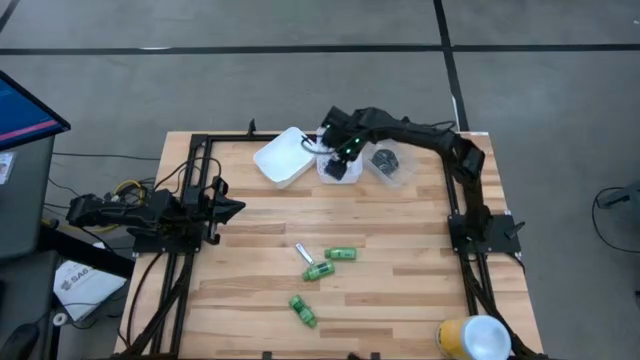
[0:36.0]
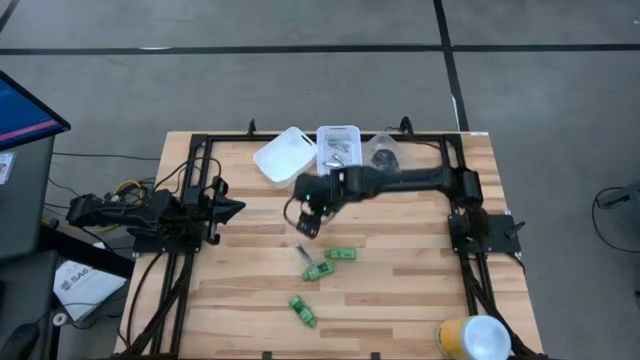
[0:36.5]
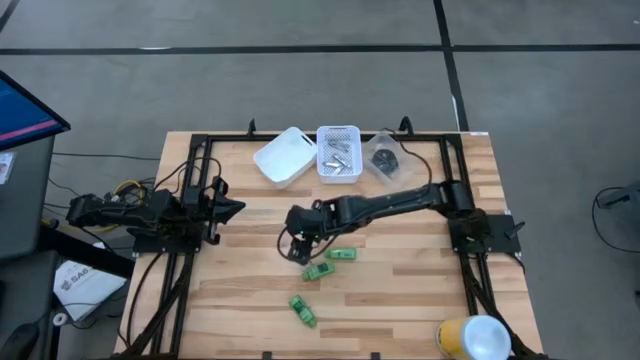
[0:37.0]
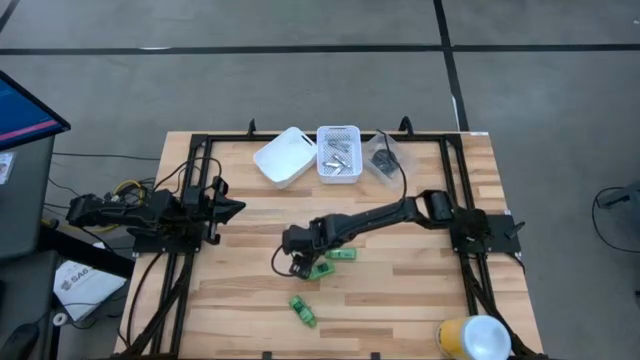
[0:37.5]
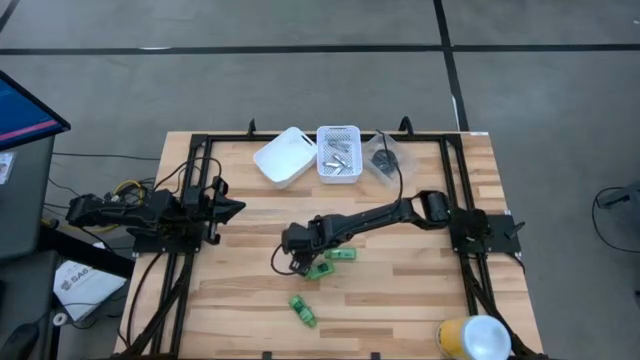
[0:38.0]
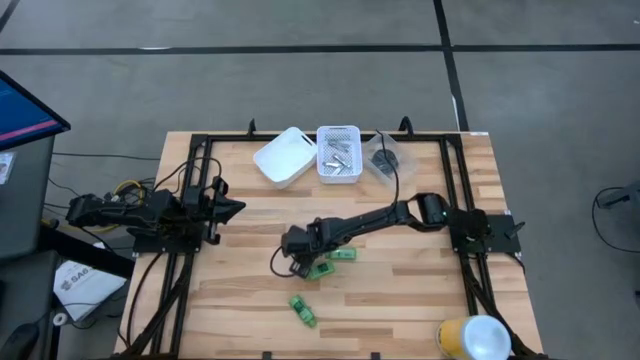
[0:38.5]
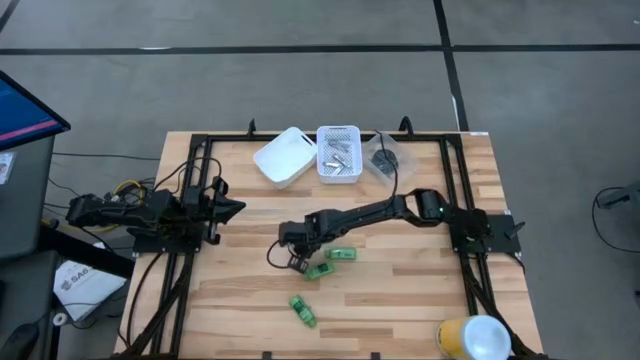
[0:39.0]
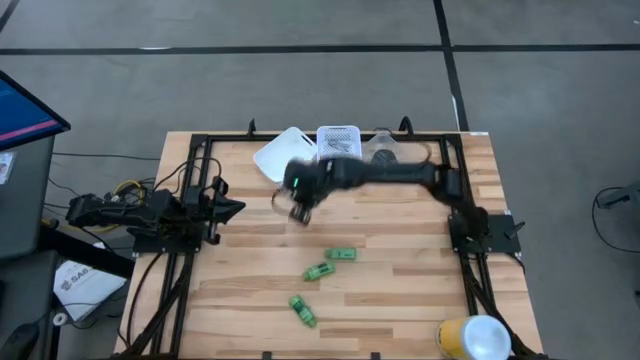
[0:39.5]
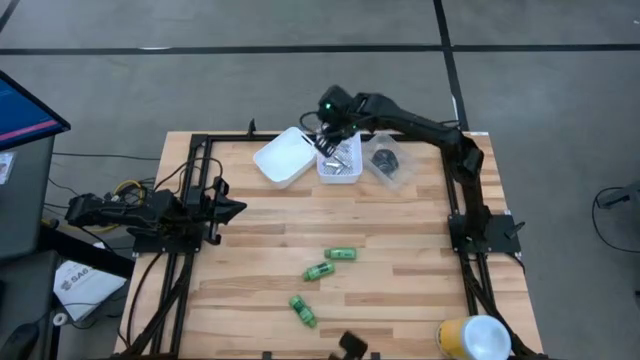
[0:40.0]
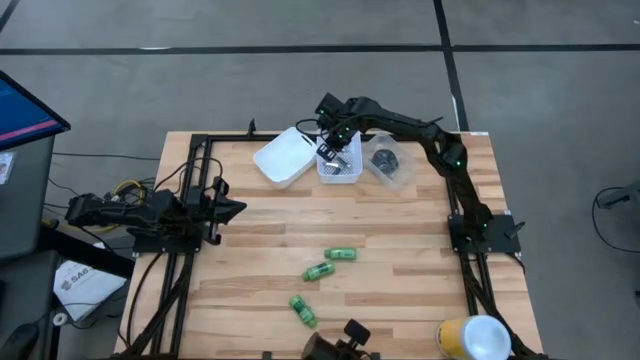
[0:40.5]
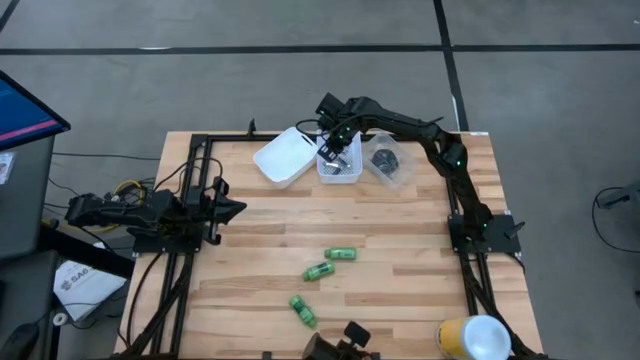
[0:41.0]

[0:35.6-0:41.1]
Task: Pick & Place Travel size toiletries
Put the silver nail cutter into the right white bin

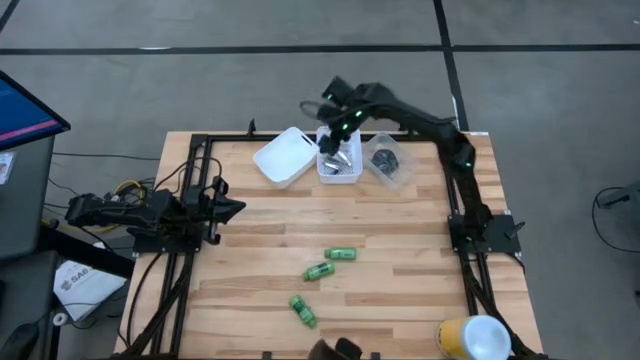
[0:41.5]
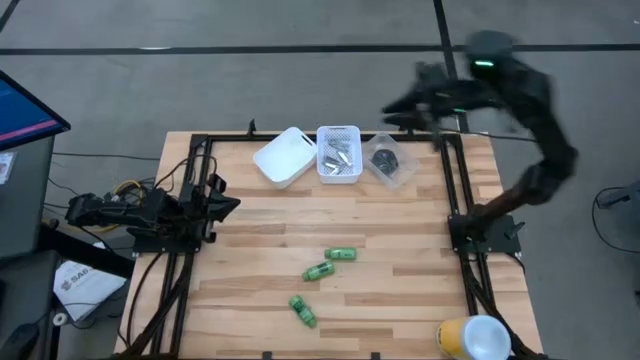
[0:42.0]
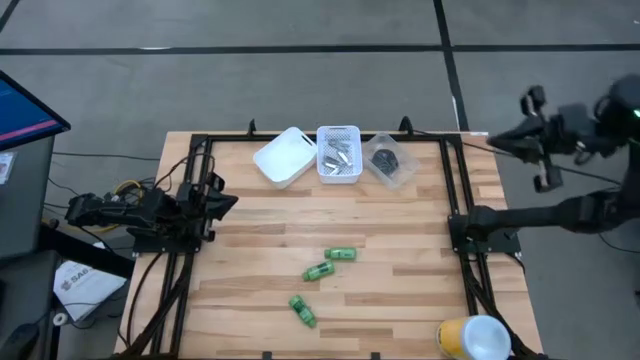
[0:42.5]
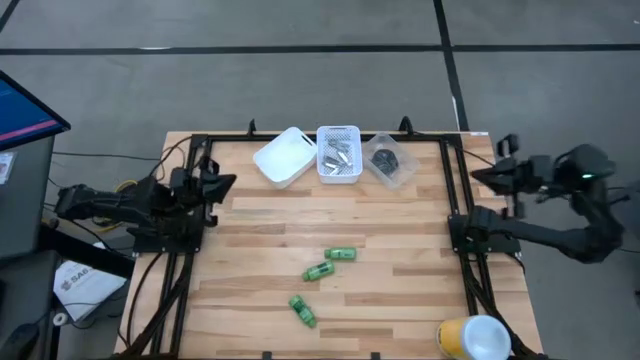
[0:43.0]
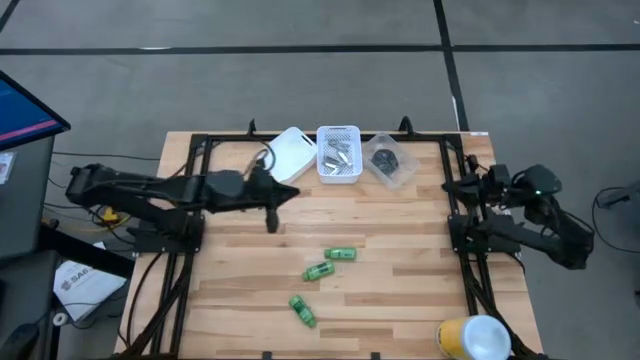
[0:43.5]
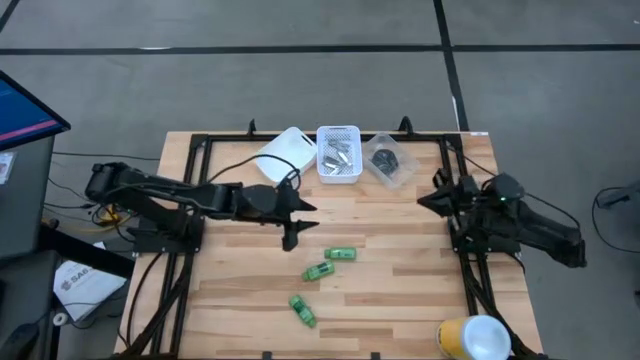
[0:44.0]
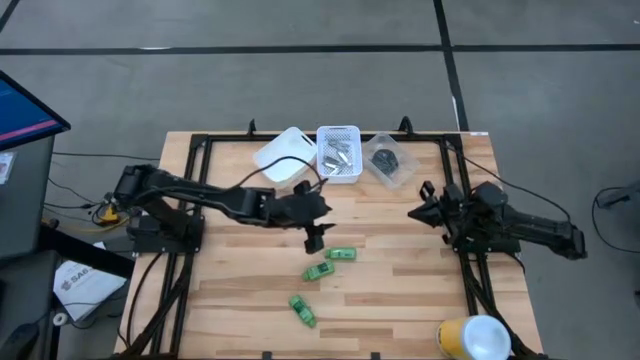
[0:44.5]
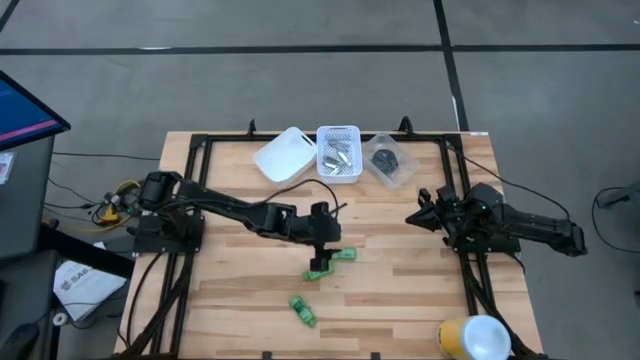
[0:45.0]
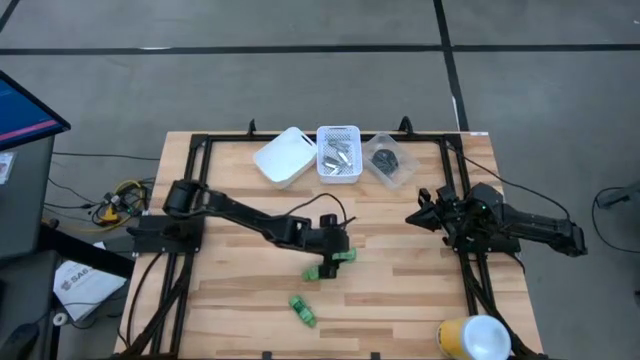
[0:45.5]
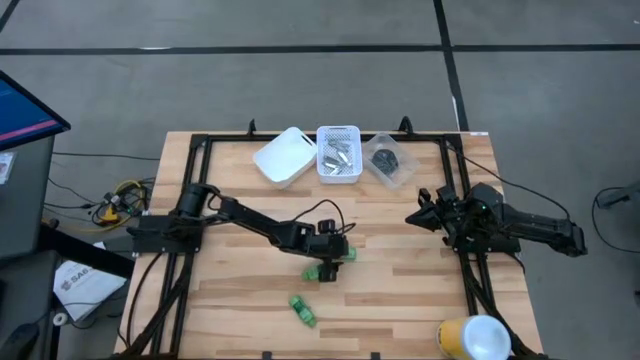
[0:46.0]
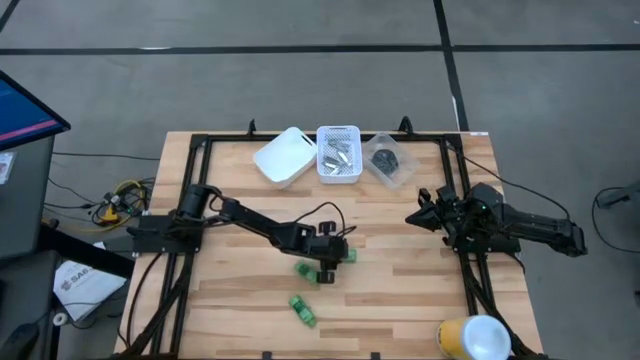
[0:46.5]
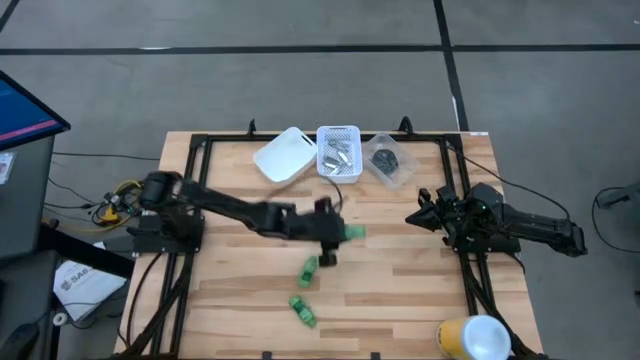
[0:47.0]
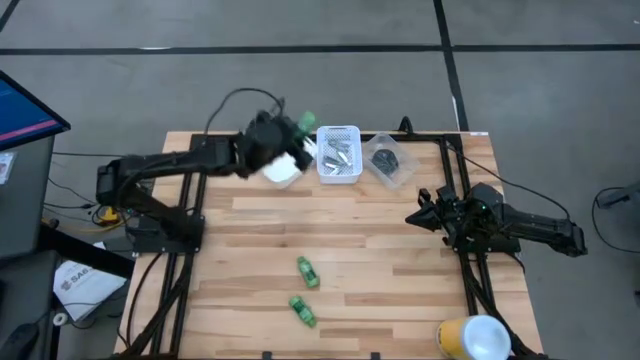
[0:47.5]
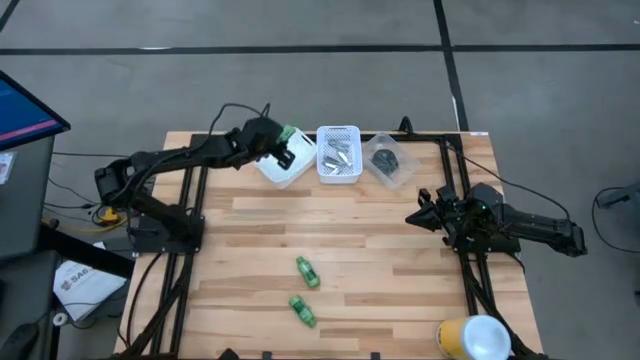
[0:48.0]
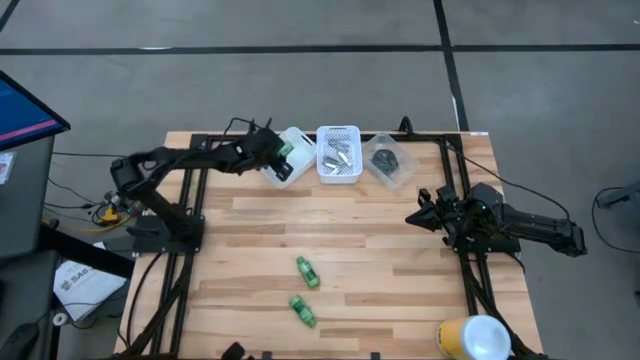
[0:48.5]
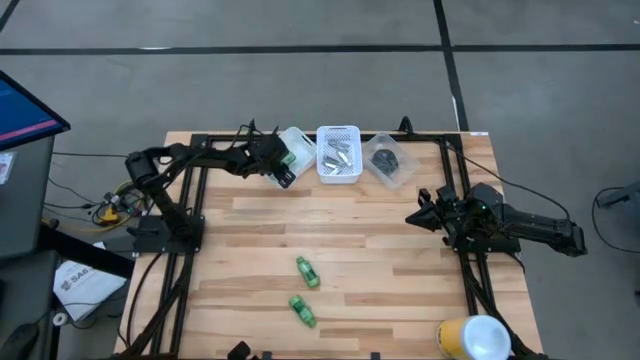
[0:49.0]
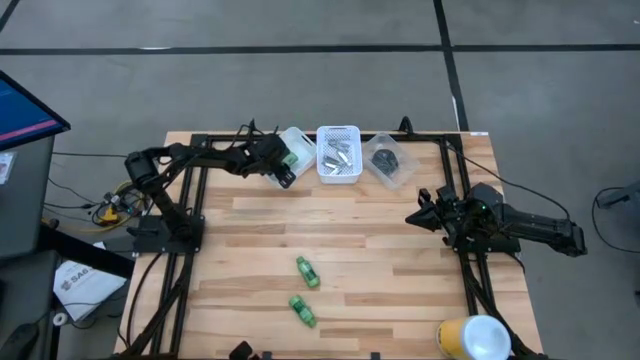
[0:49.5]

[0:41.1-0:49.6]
Put the green shampoo bottle into the left white bin

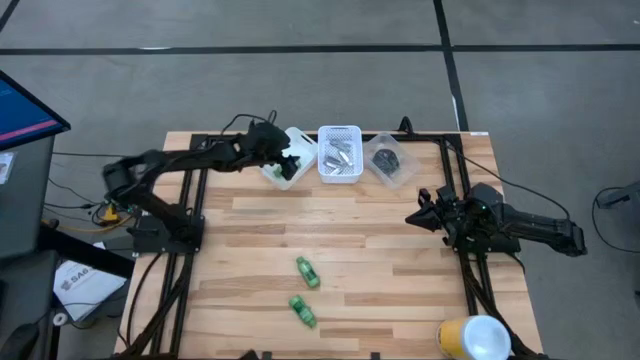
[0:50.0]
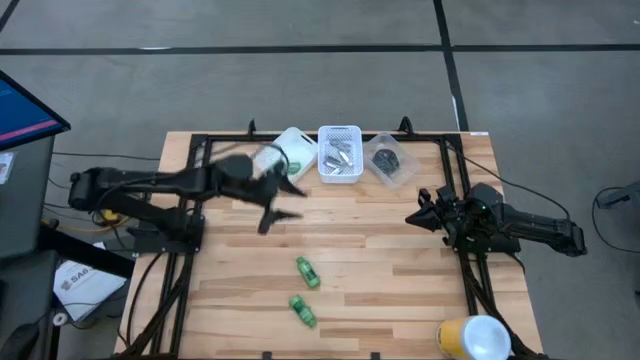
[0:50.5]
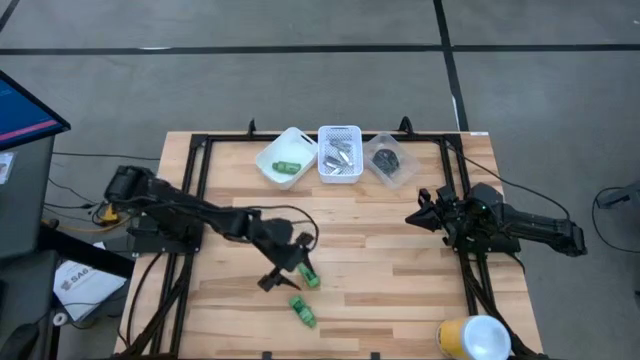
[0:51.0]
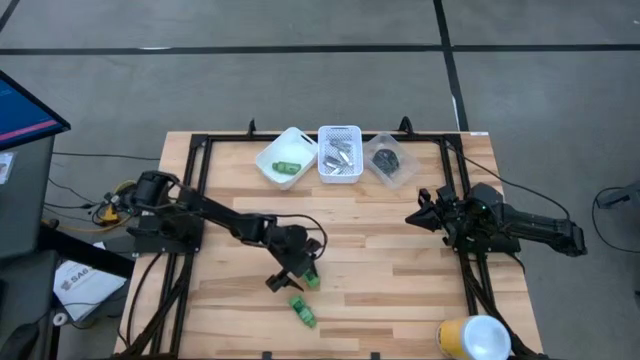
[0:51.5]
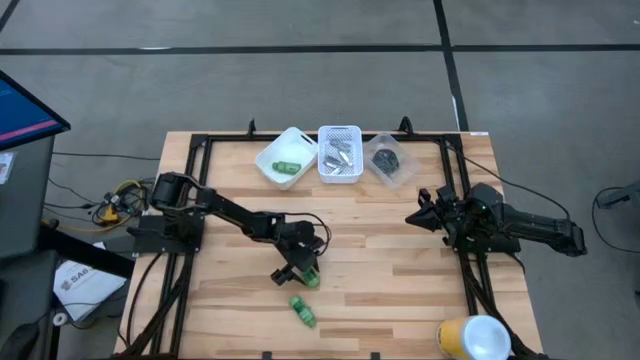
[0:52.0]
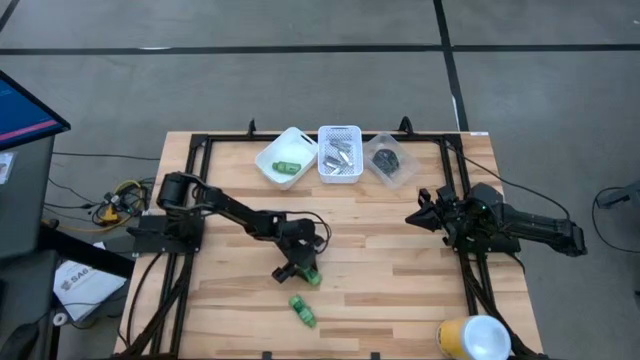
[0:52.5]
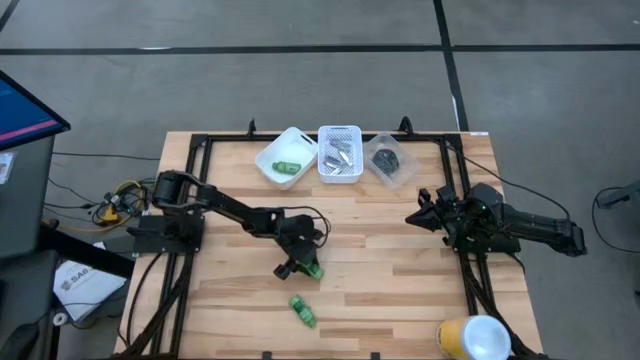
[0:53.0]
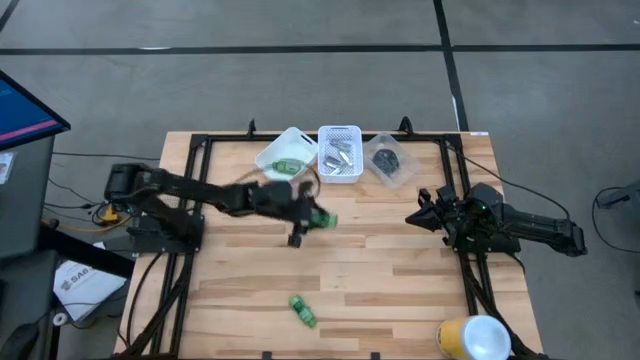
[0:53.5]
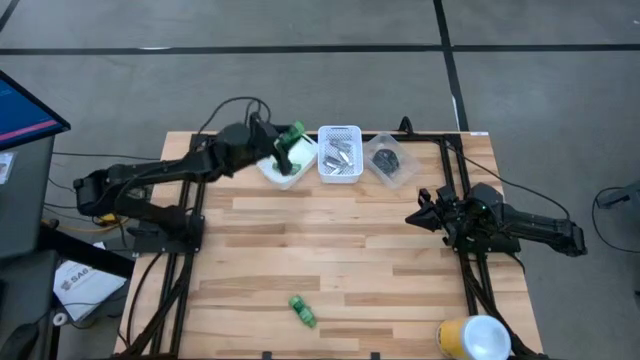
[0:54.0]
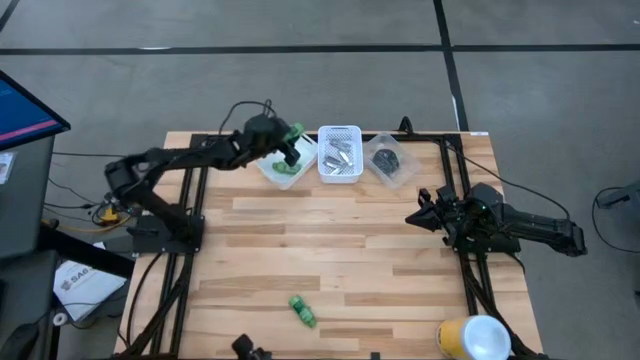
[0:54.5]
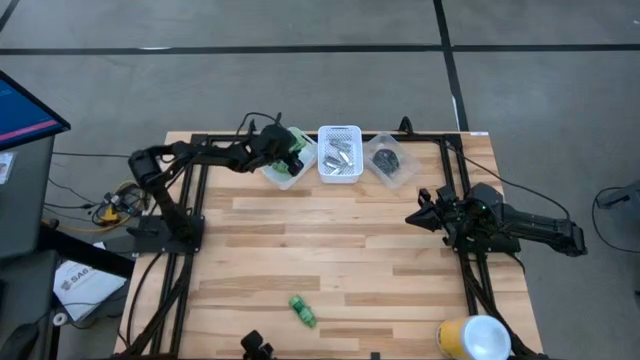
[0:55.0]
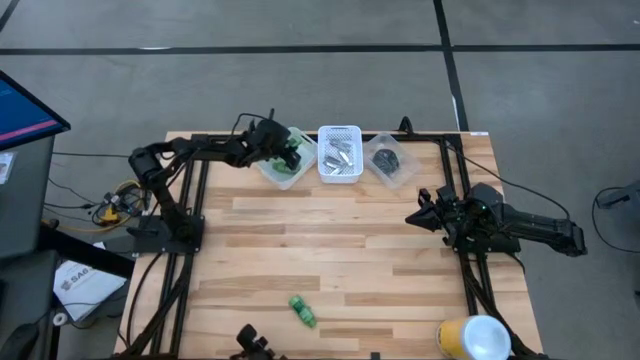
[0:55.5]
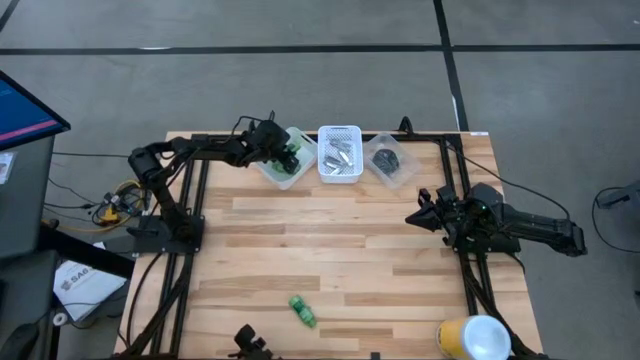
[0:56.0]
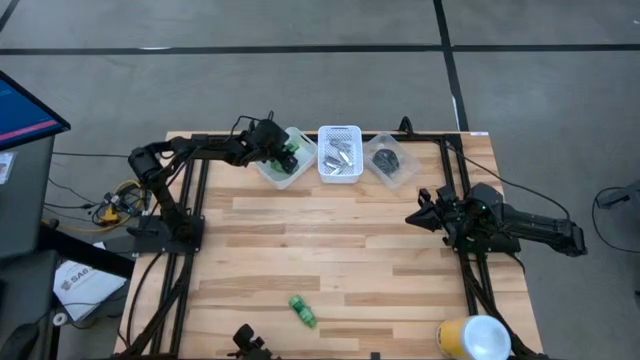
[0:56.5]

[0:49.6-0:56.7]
Put the green shampoo bottle into the left white bin
